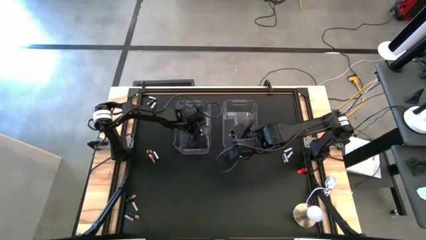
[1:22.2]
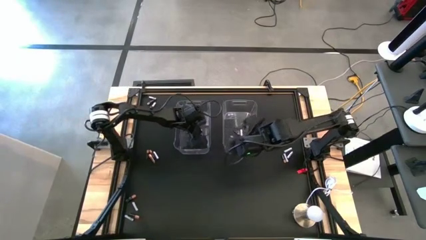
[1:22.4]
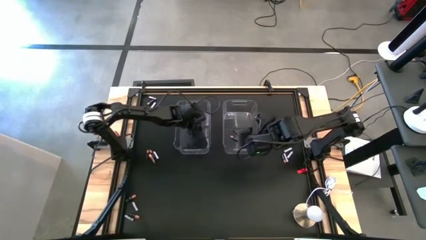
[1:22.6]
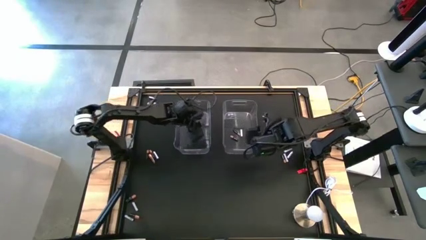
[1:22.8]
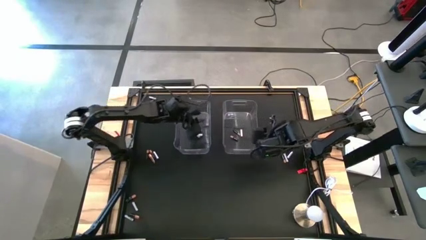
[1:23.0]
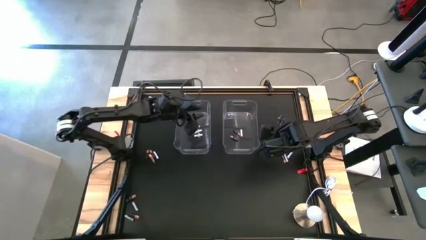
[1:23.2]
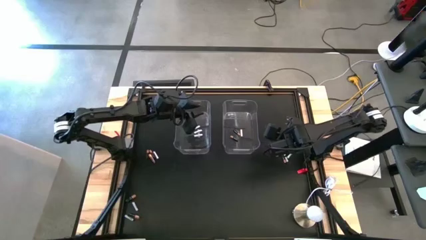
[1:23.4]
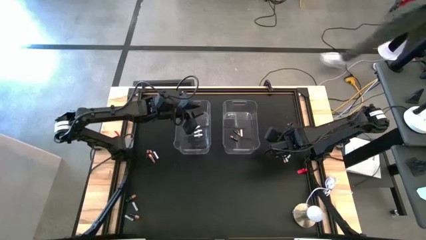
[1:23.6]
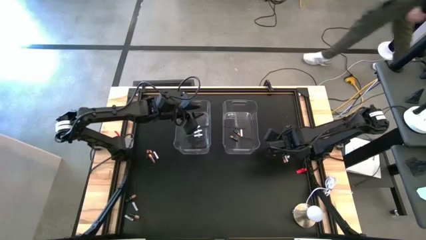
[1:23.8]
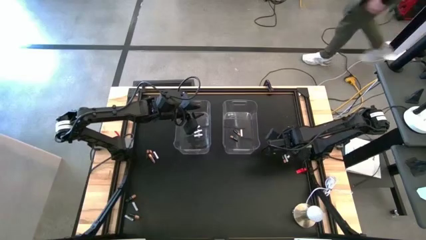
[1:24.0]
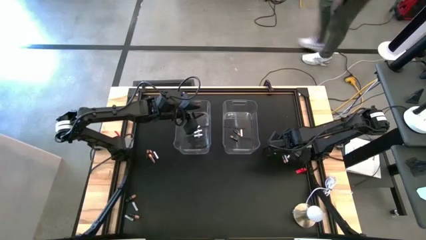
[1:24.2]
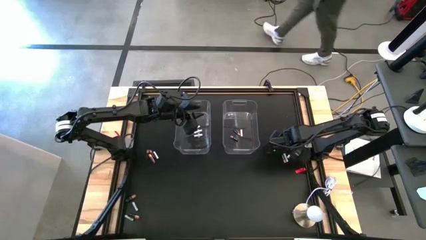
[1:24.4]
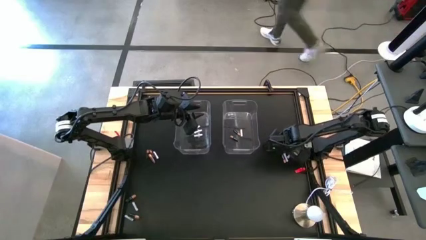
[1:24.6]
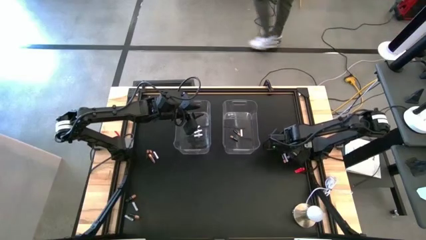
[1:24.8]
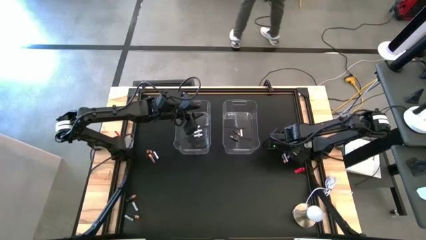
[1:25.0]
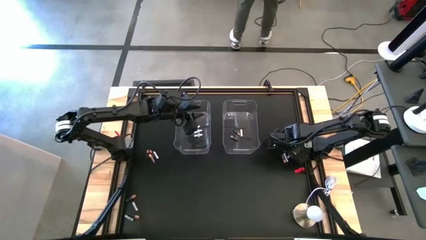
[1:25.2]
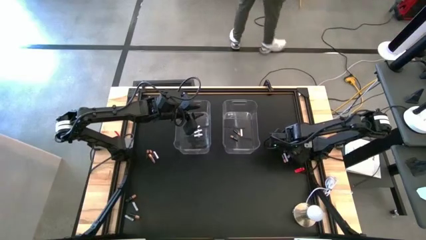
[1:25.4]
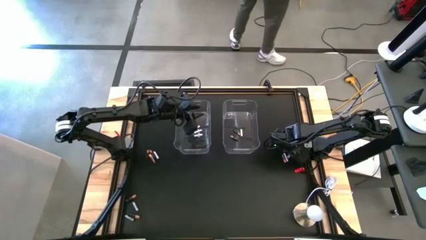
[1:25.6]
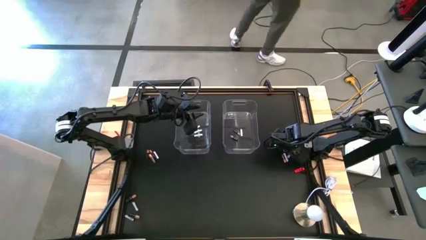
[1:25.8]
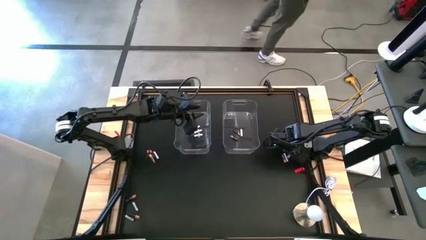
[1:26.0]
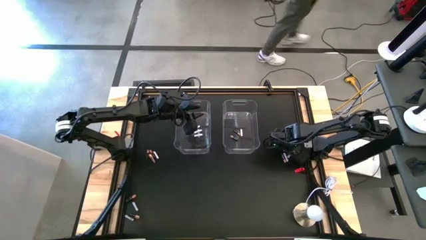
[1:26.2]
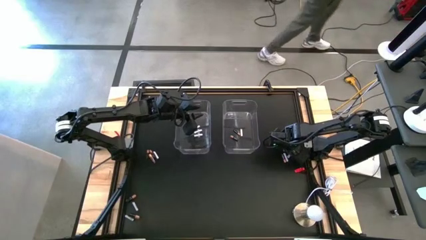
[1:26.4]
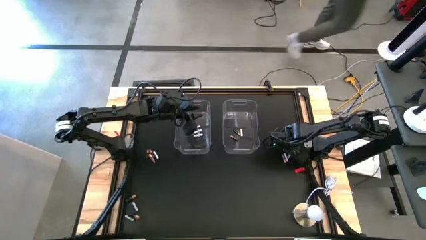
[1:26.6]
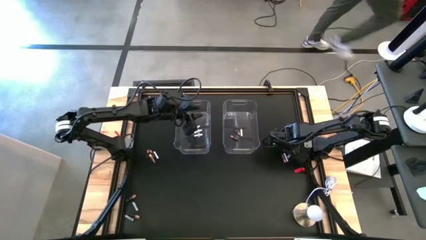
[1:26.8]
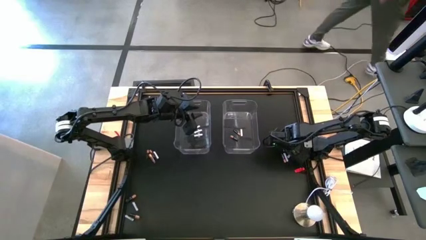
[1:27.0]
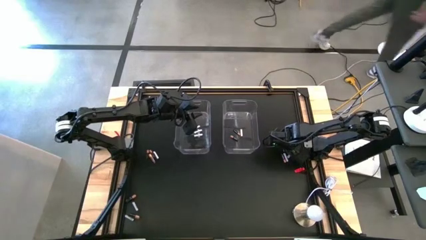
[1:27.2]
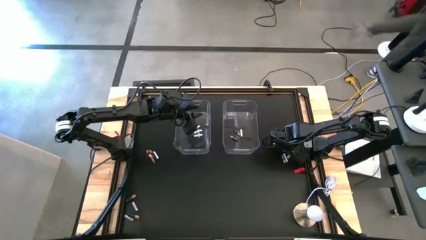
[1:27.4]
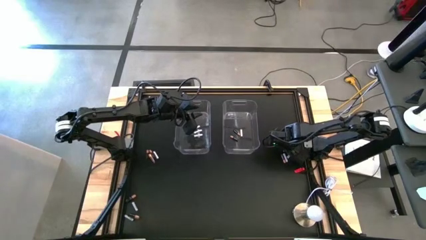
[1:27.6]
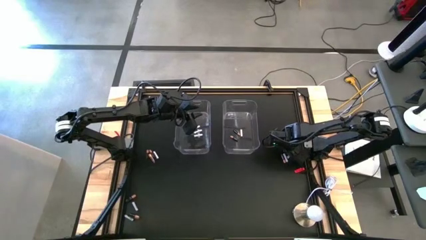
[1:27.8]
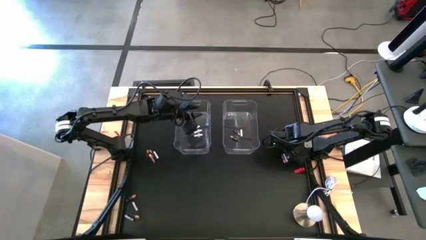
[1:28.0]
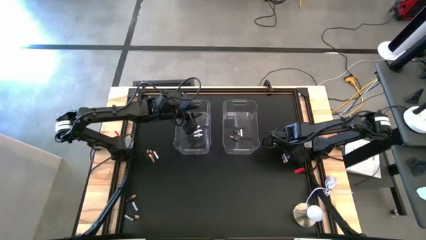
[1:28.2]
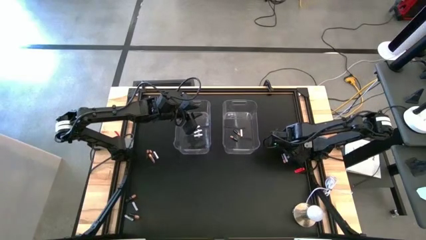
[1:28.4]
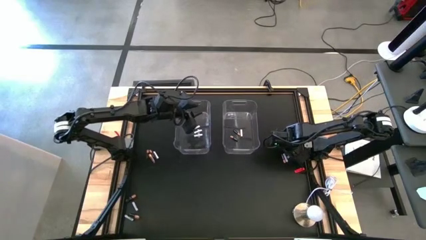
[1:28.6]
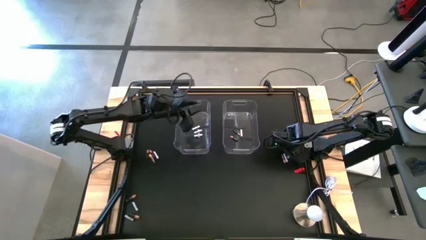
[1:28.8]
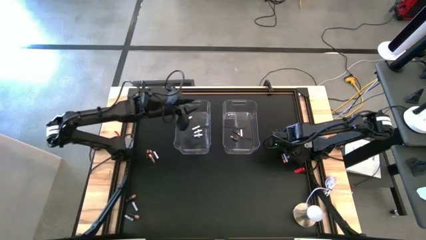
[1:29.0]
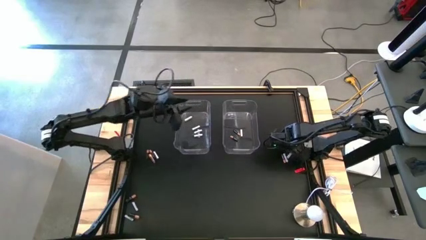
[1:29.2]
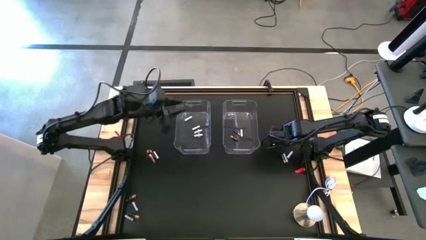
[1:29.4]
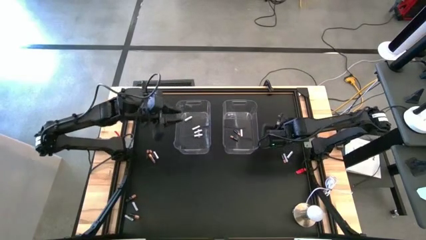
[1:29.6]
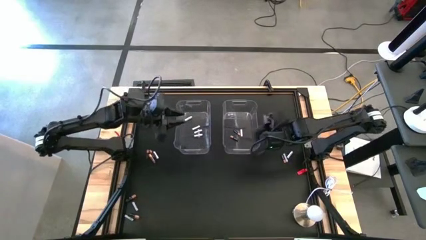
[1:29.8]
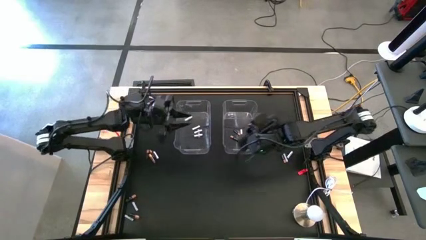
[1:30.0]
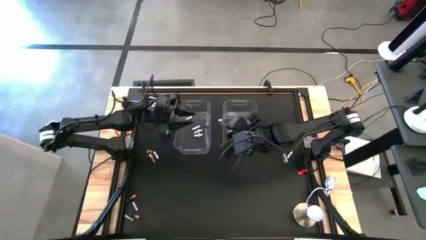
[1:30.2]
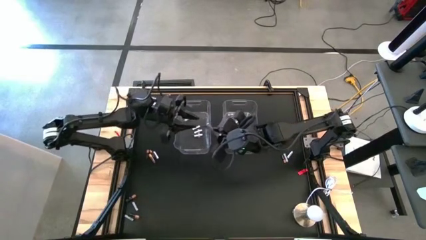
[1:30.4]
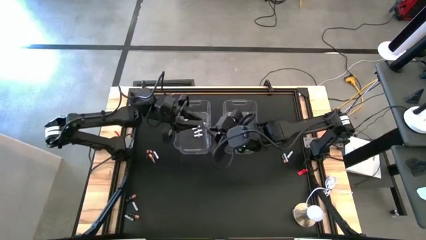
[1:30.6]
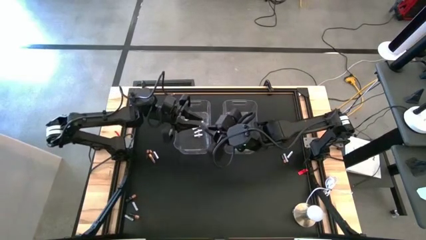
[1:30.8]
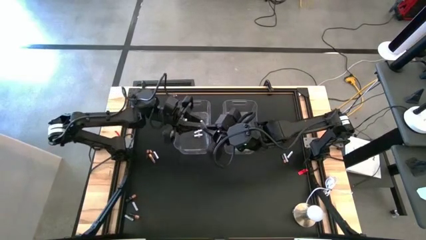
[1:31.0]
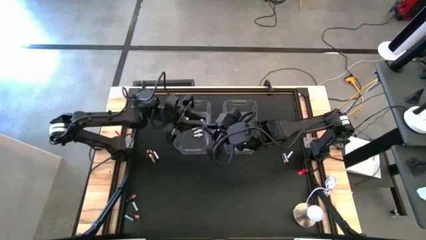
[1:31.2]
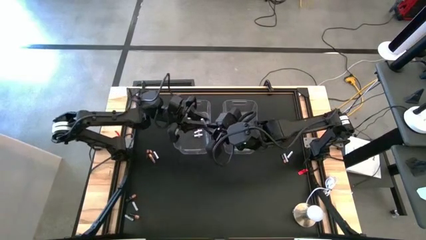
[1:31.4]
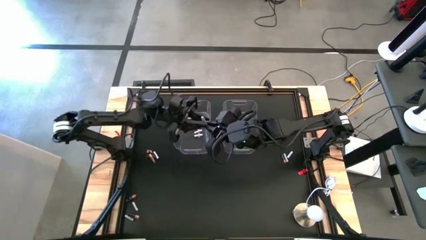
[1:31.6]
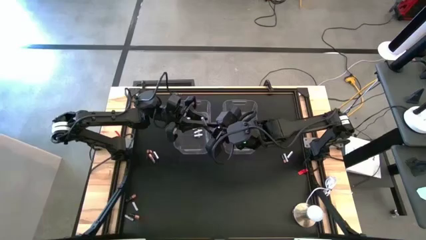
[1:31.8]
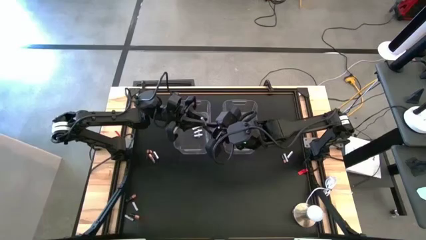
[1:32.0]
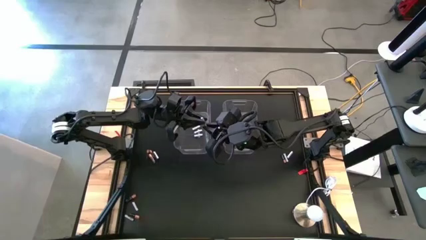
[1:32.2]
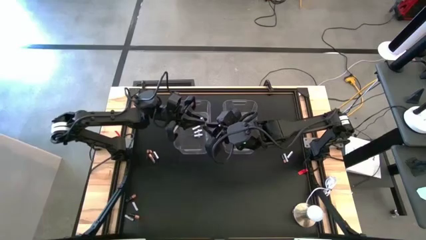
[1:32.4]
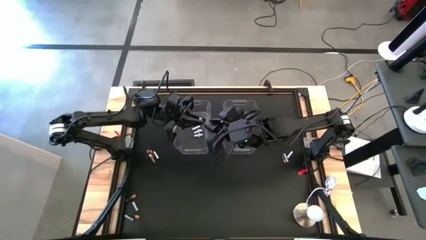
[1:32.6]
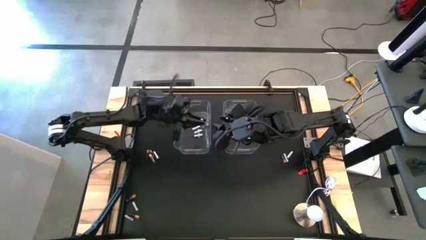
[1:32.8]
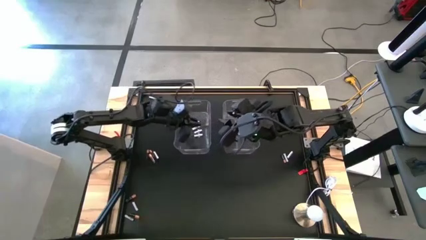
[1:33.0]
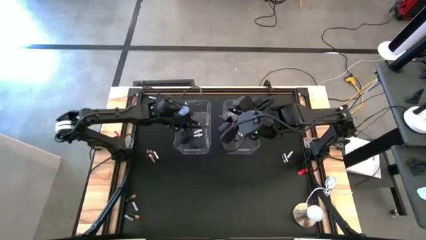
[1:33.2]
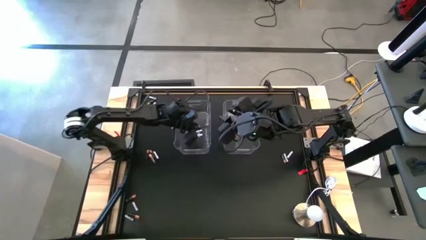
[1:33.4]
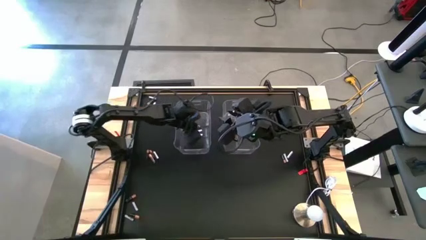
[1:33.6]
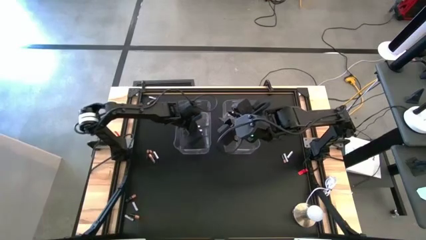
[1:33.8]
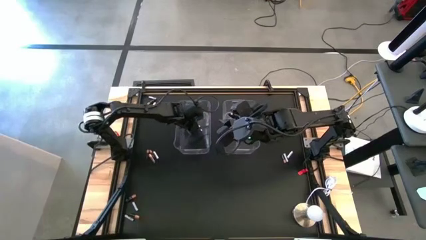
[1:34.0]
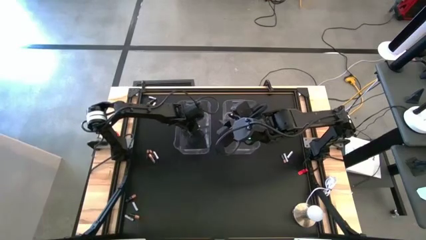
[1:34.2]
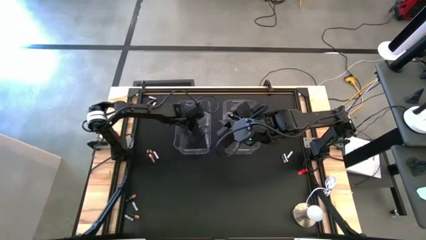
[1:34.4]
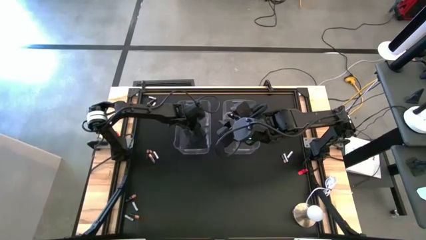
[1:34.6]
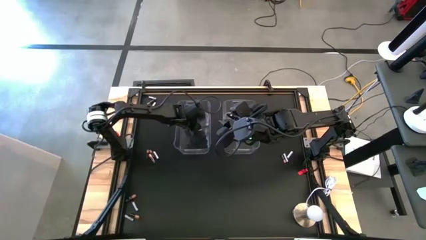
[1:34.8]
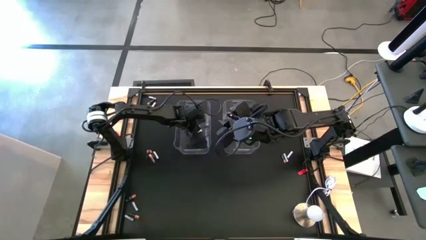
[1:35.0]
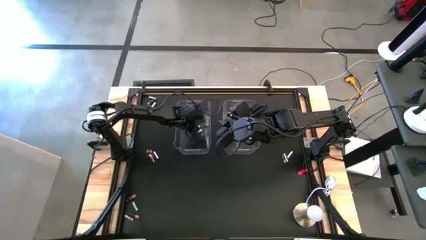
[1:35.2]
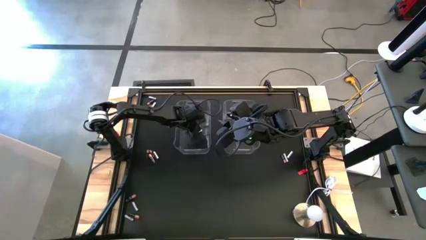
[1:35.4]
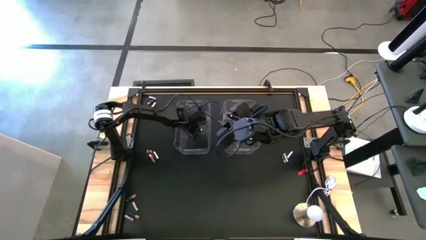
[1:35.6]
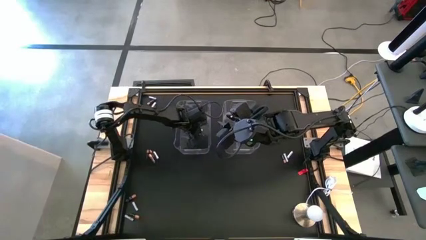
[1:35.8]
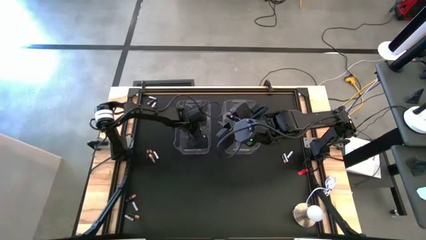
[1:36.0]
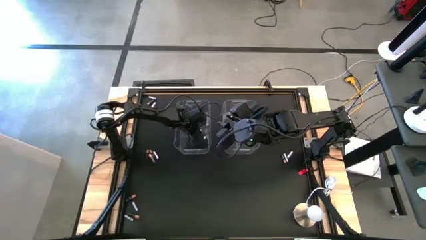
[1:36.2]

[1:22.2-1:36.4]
Task: Sort batteries
Put the white battery into the left transparent bin
